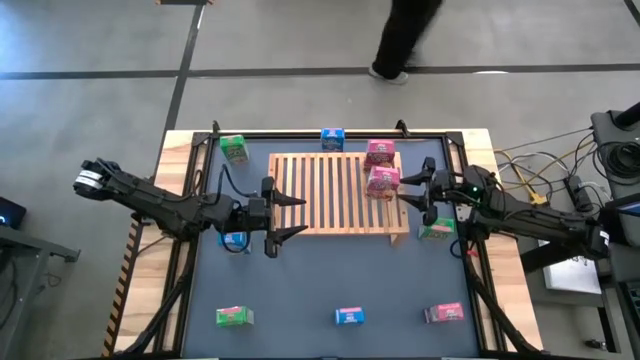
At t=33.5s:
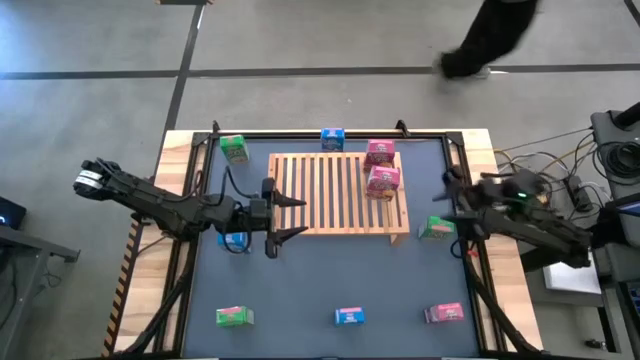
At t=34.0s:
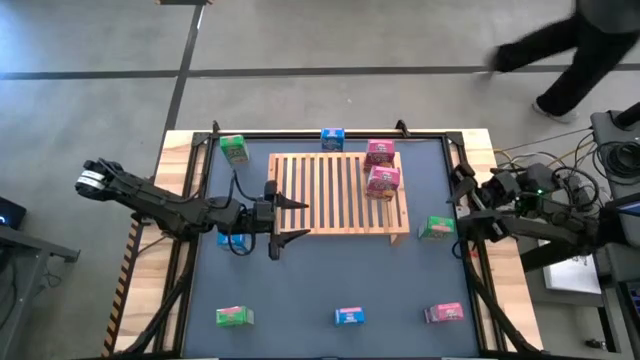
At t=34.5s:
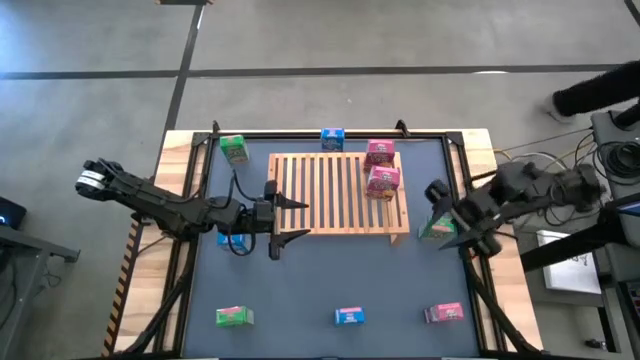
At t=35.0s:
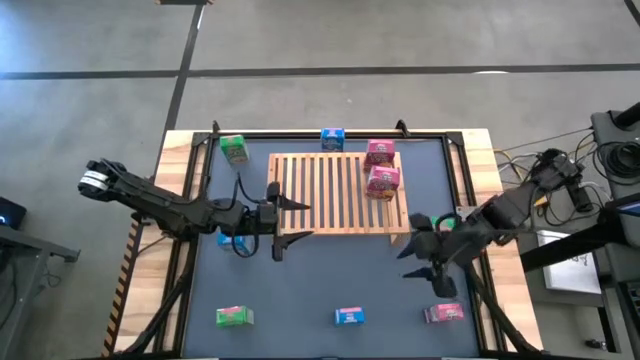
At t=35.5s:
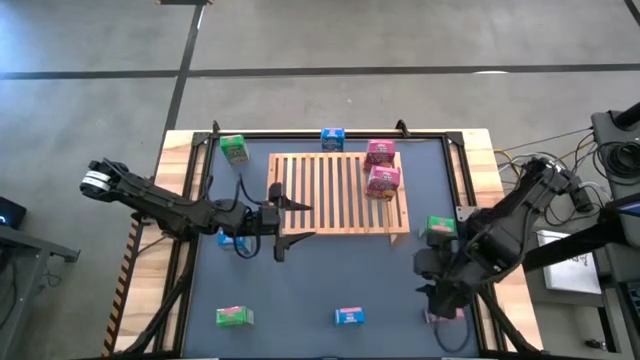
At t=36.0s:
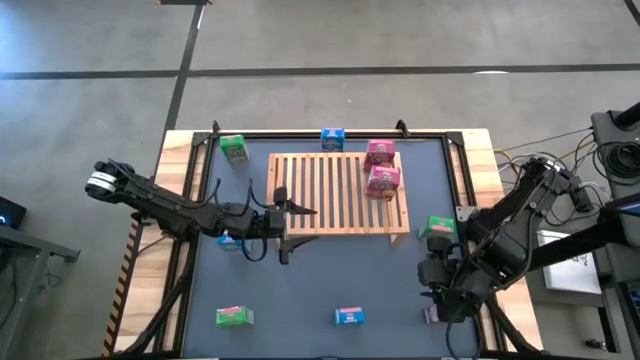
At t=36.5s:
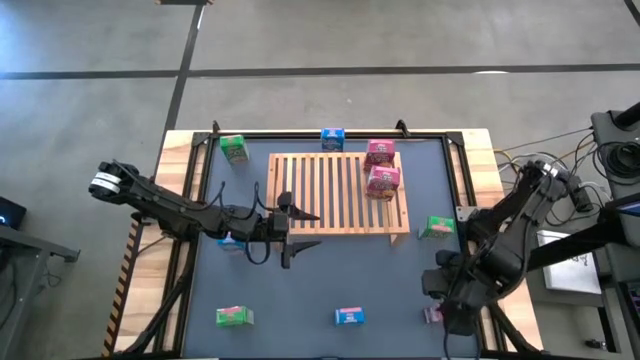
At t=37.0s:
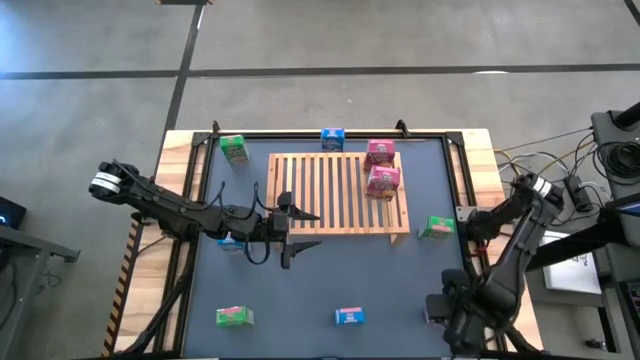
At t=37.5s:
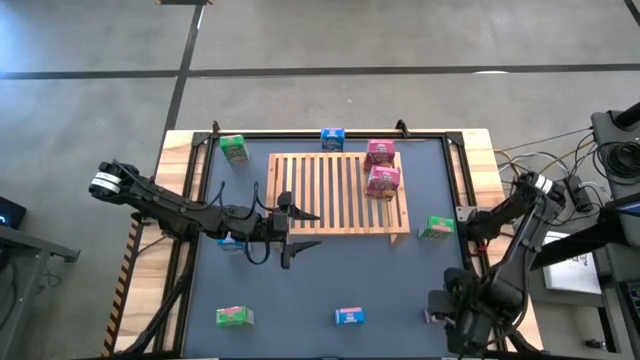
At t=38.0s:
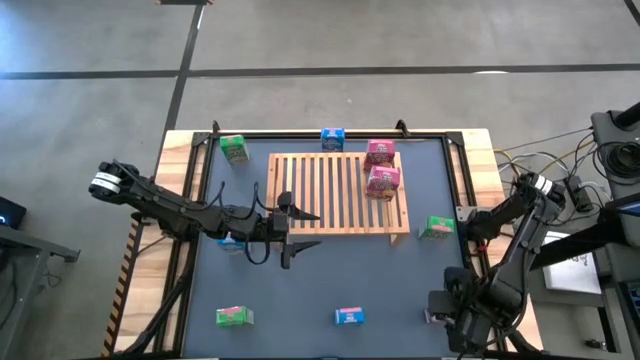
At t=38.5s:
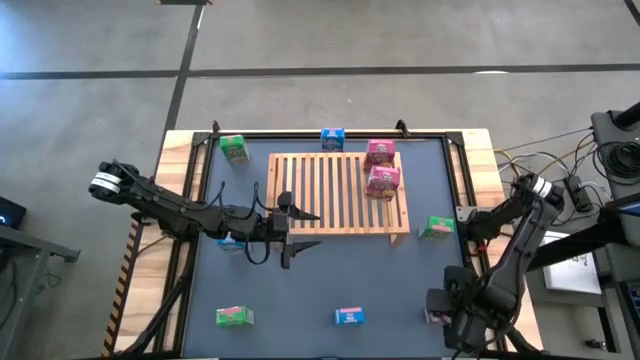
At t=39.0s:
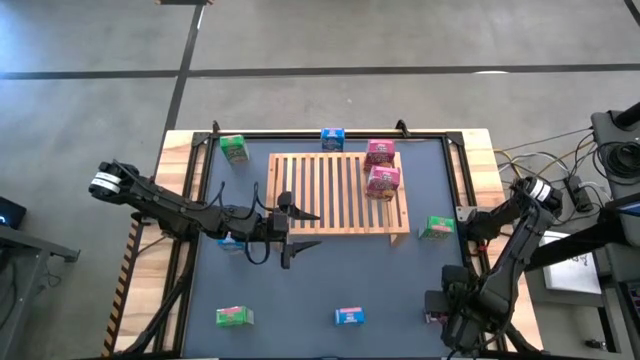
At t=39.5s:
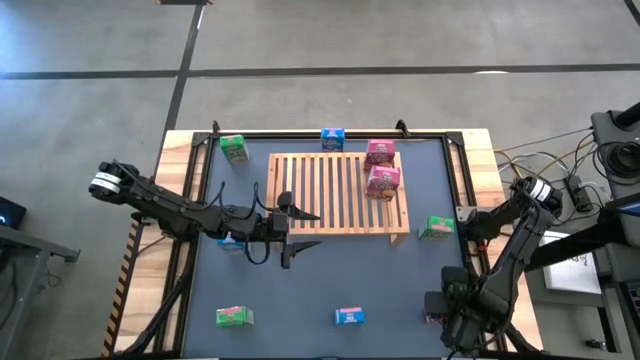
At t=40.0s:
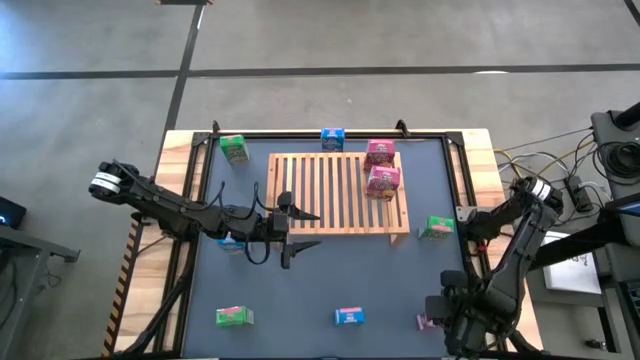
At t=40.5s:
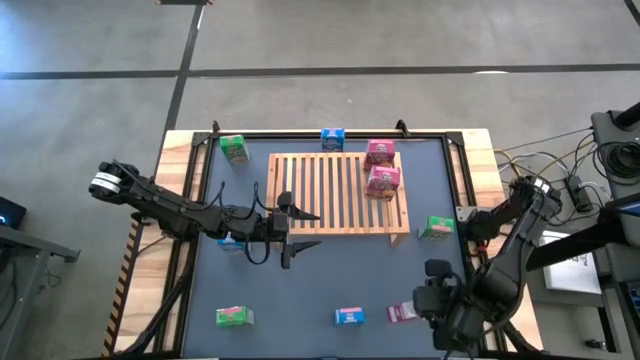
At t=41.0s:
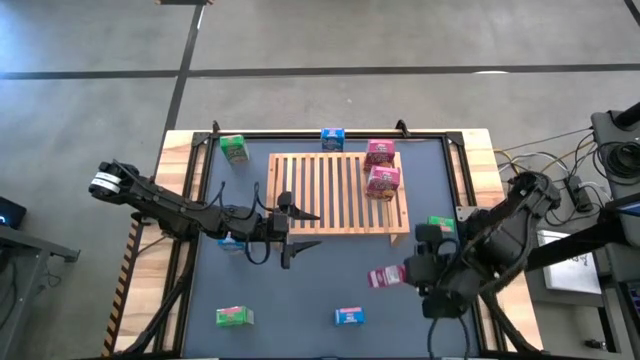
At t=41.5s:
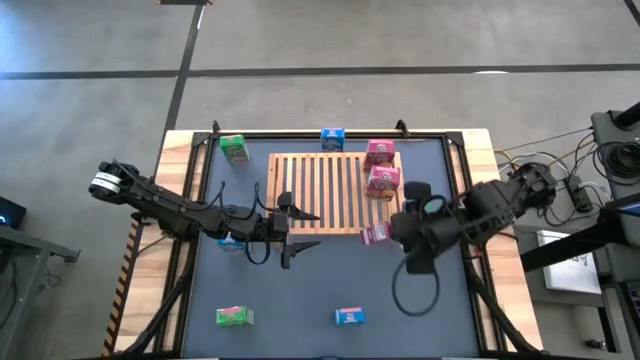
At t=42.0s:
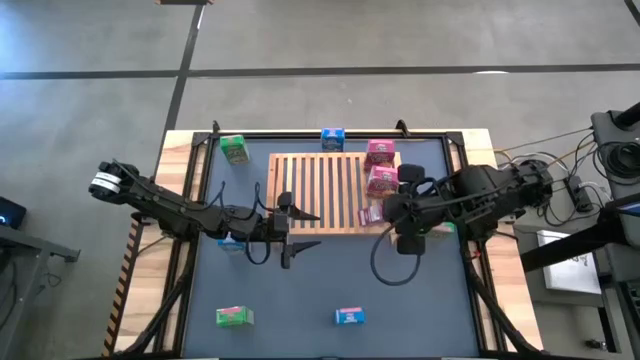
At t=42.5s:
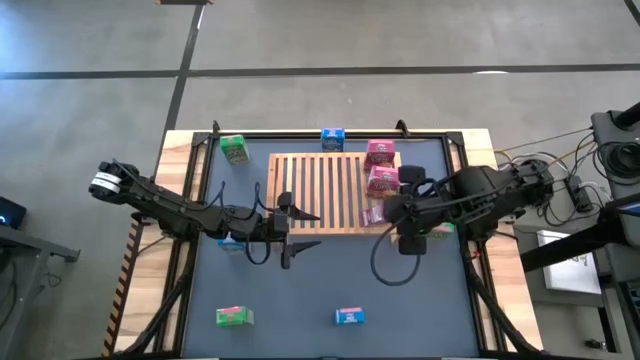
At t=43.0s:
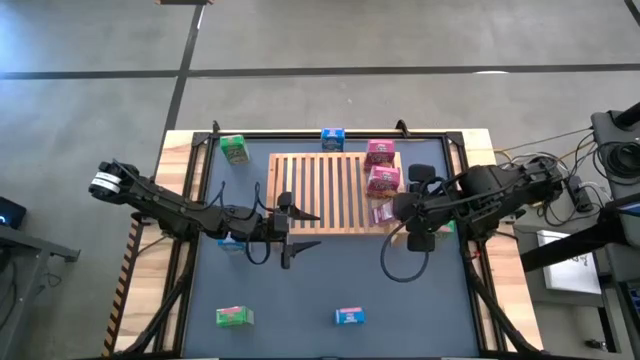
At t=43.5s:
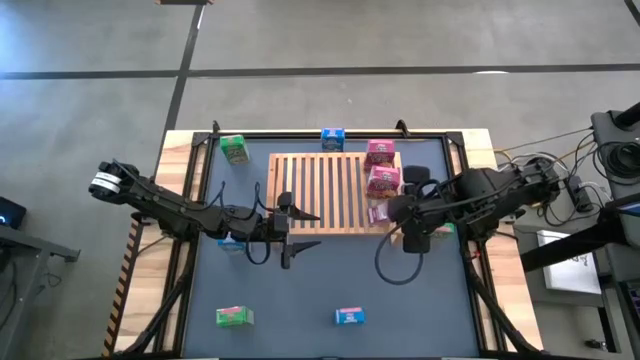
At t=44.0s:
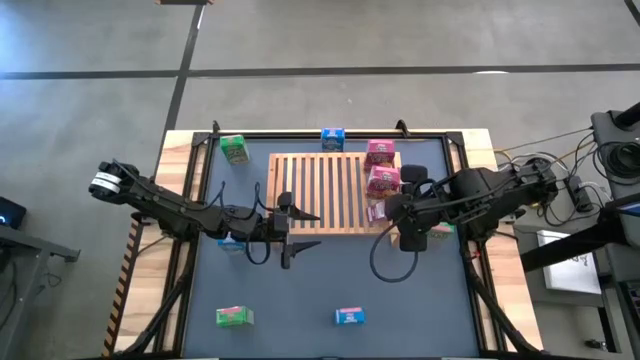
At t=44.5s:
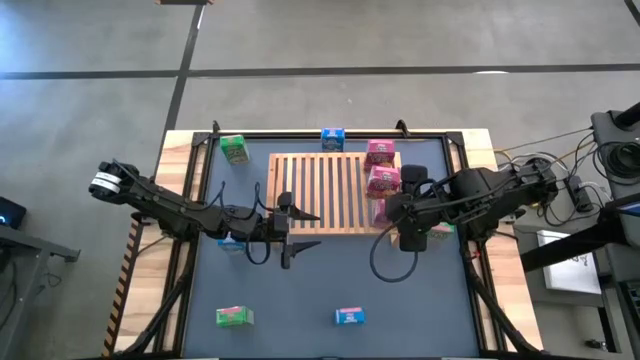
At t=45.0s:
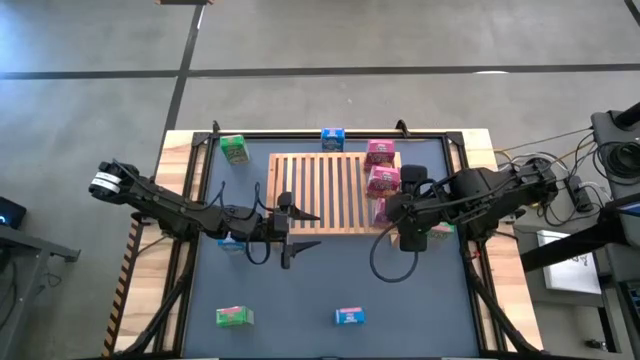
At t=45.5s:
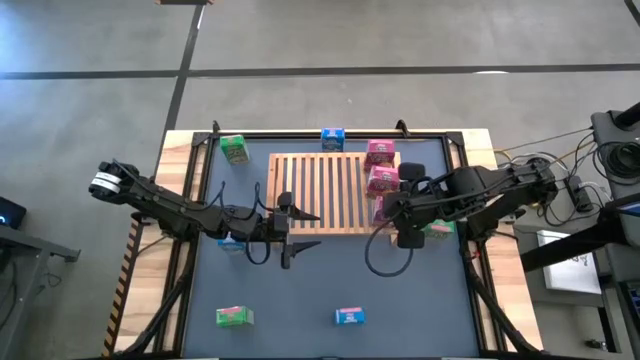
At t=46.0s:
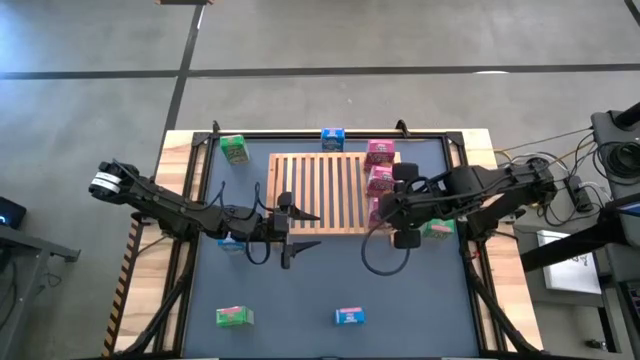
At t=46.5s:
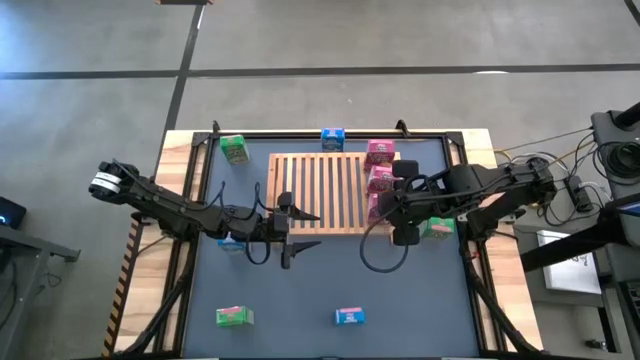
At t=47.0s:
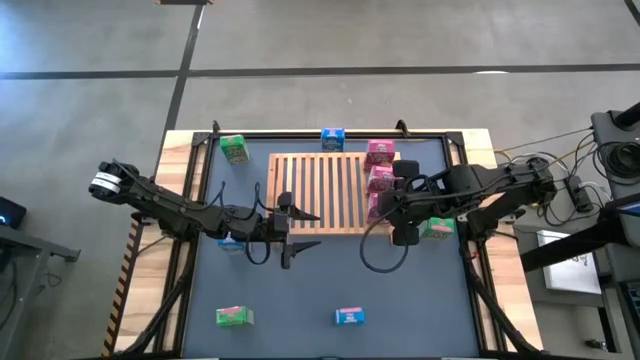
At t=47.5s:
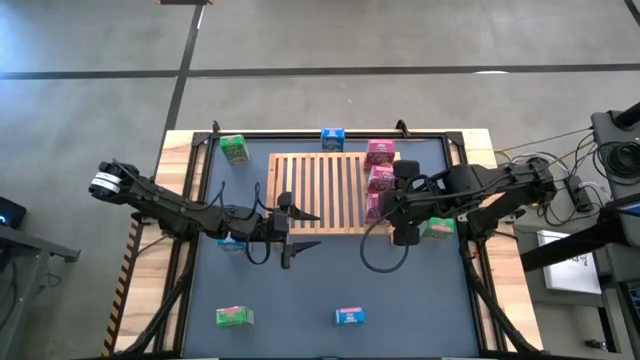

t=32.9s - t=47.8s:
Task: Stack cereal on shelf
Put the pink cereal box on the shelf aligned with the other pink cereal boxes

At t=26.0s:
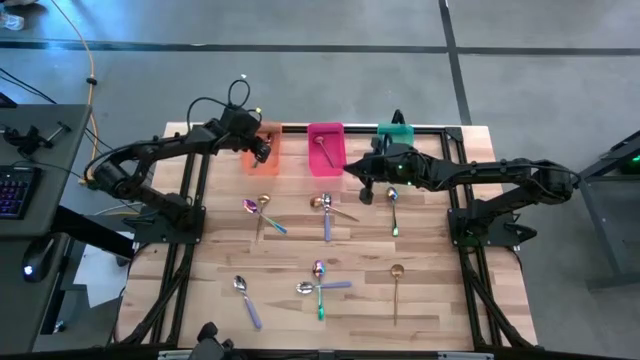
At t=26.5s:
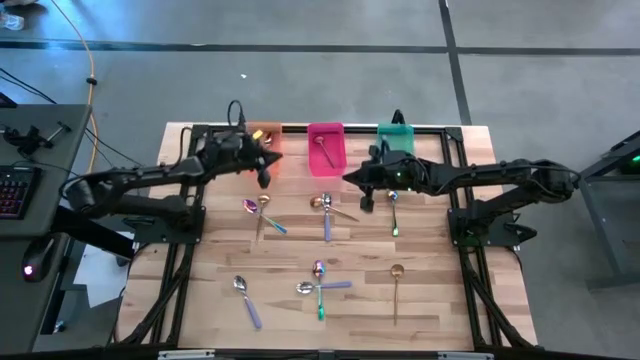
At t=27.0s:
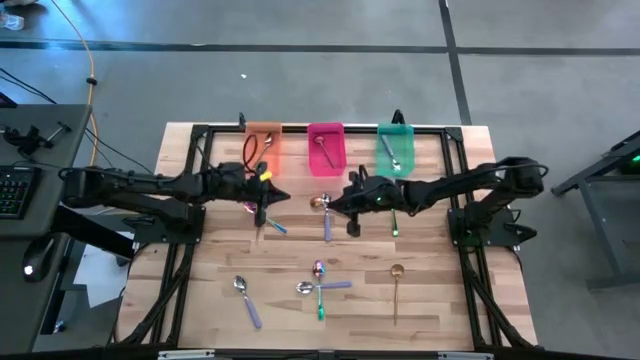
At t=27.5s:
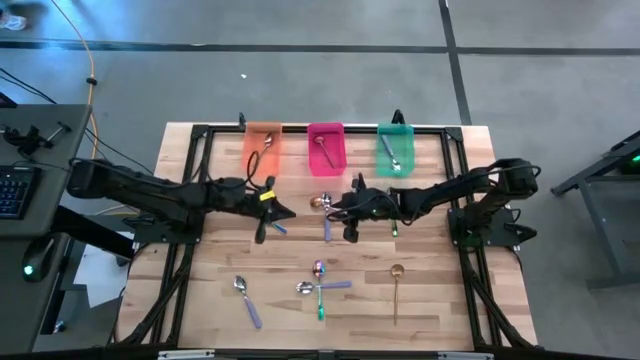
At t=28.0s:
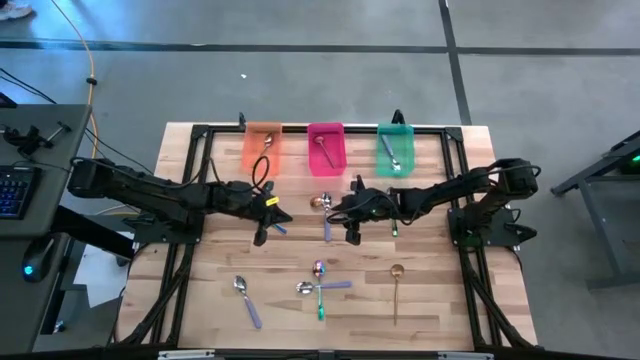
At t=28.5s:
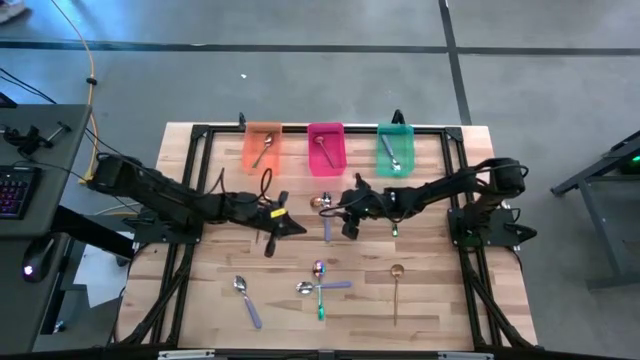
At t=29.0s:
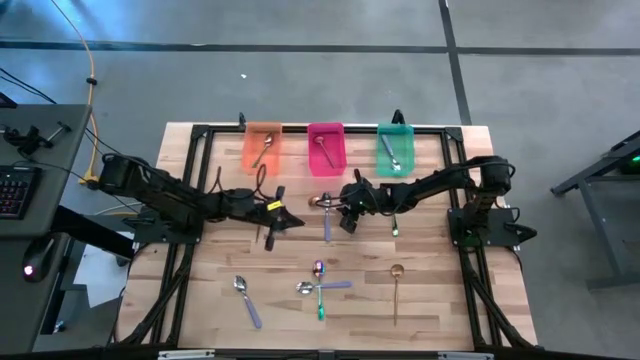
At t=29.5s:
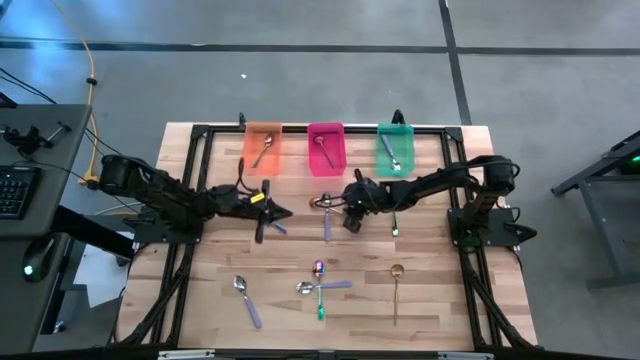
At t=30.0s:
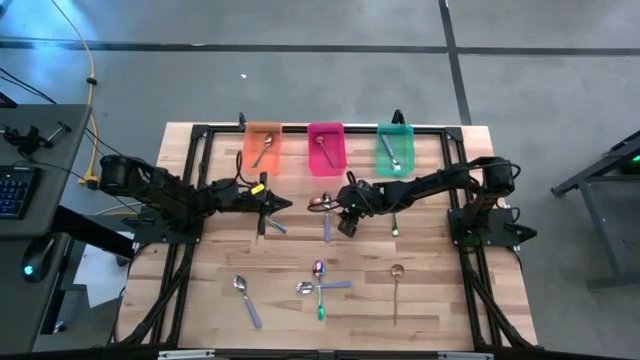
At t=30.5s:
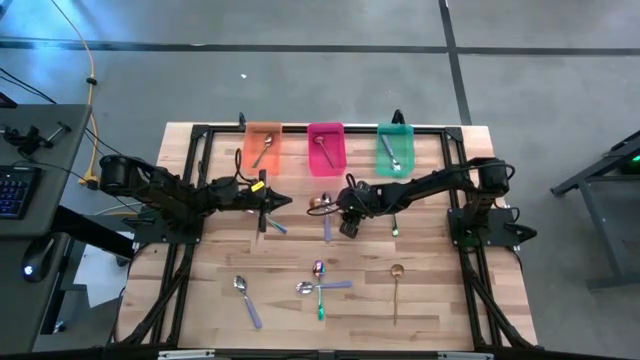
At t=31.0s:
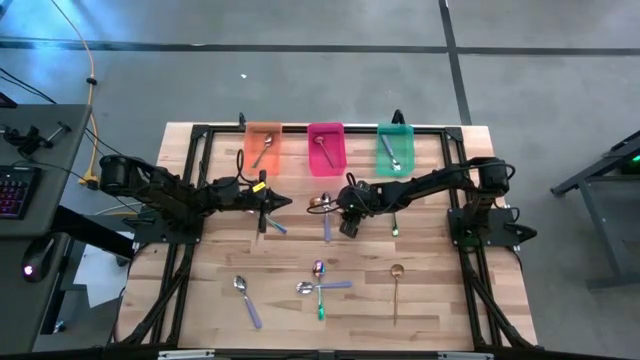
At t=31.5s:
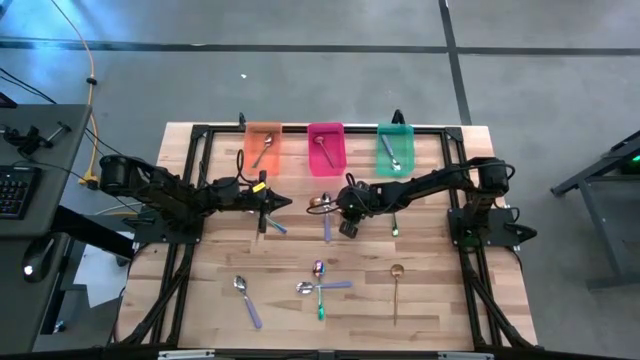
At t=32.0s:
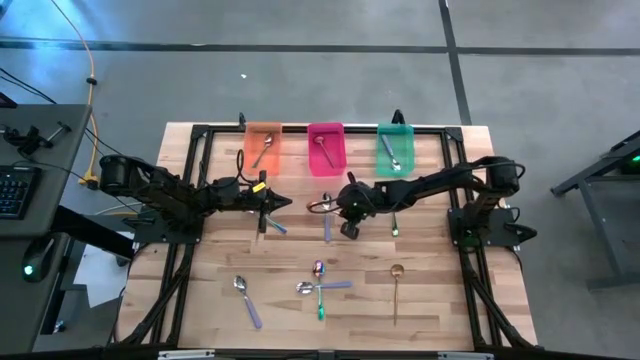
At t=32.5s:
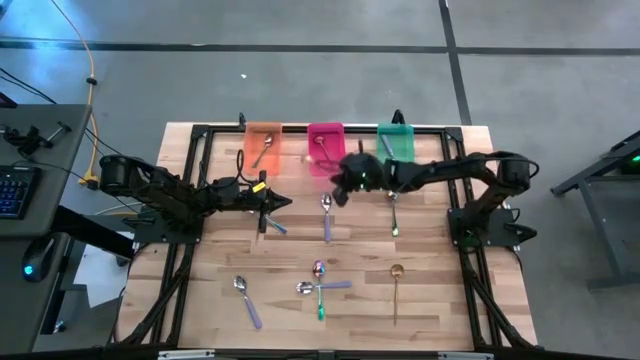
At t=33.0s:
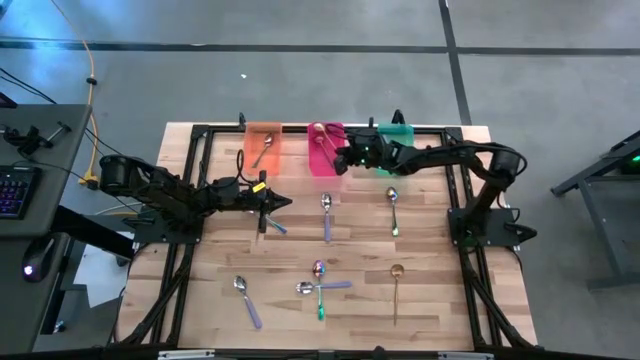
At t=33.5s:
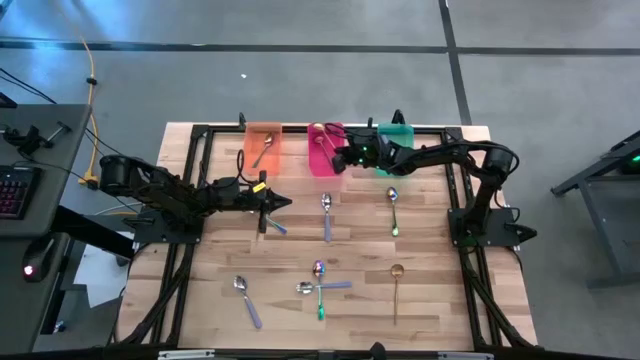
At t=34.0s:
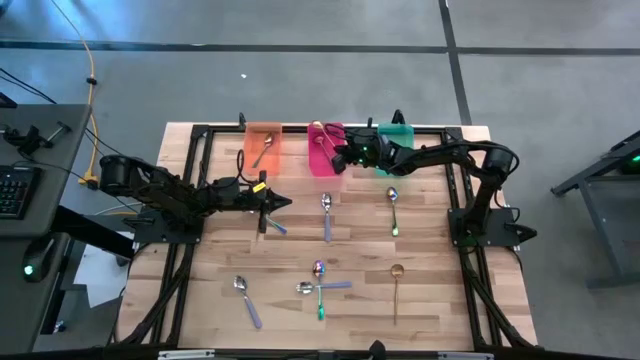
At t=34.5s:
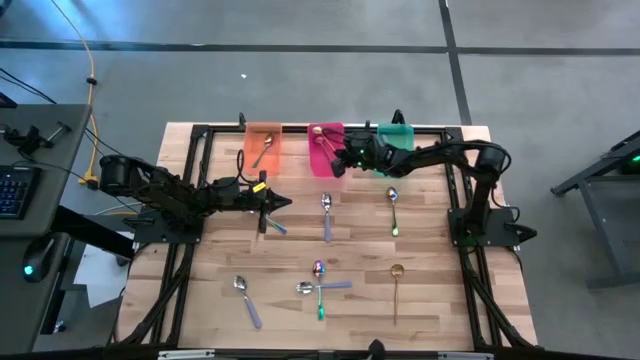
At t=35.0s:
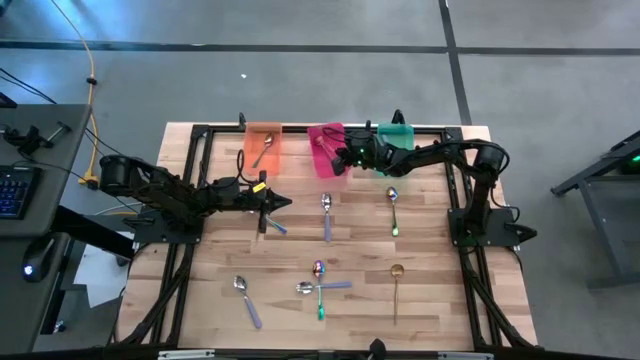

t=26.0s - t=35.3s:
Task: Sort silverware by color (type)
Put the middle top yellow spoon into the pink bin
